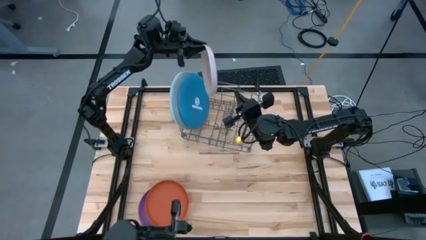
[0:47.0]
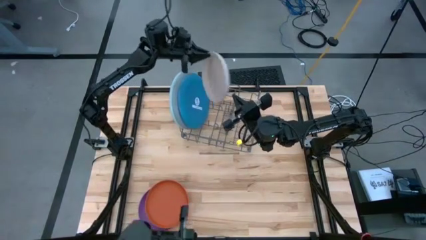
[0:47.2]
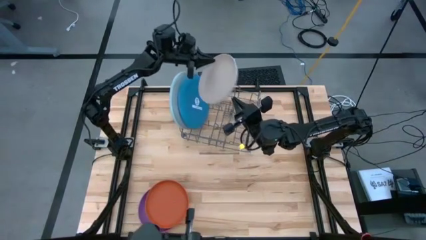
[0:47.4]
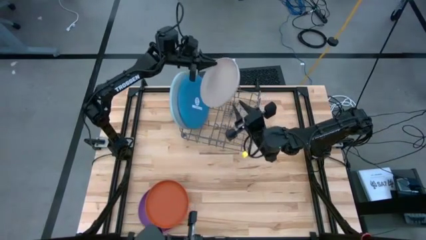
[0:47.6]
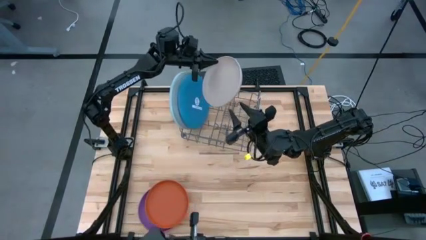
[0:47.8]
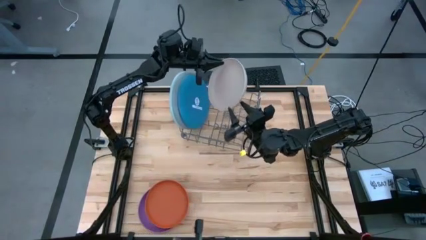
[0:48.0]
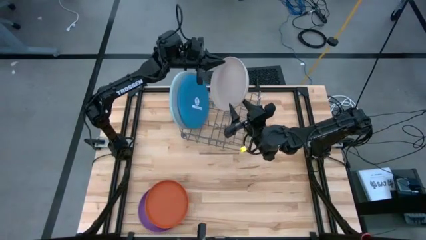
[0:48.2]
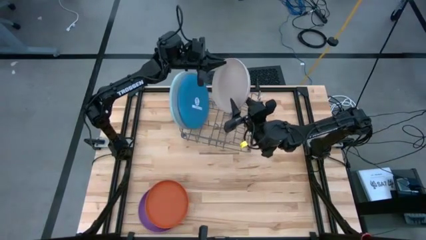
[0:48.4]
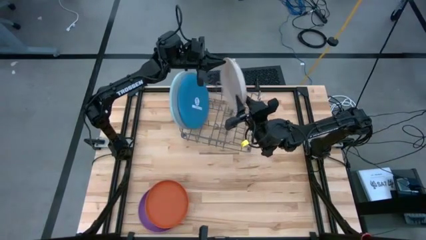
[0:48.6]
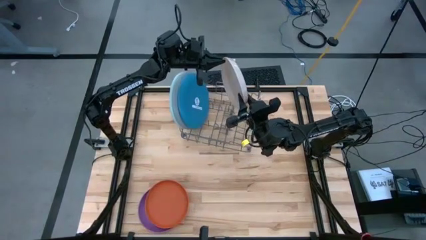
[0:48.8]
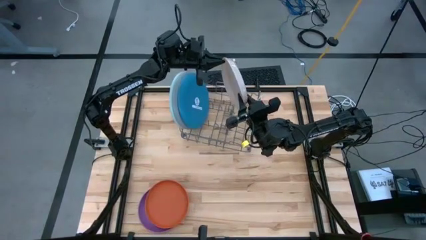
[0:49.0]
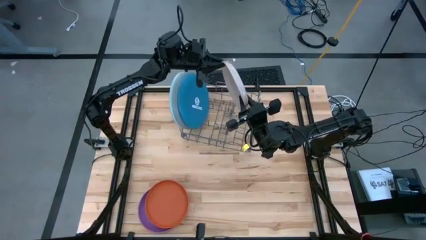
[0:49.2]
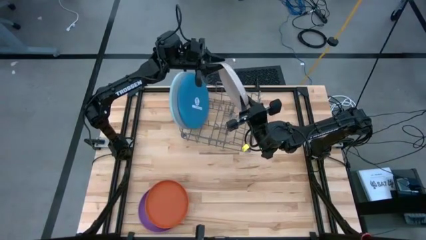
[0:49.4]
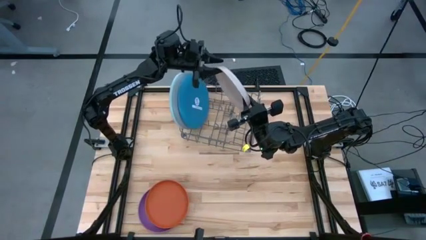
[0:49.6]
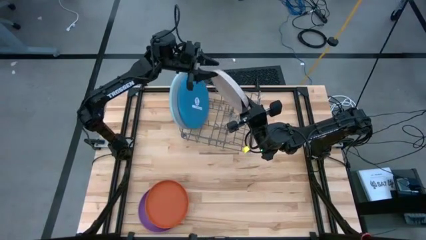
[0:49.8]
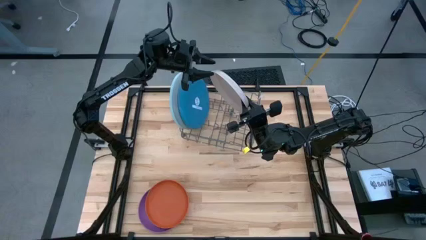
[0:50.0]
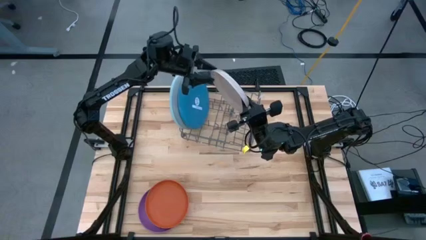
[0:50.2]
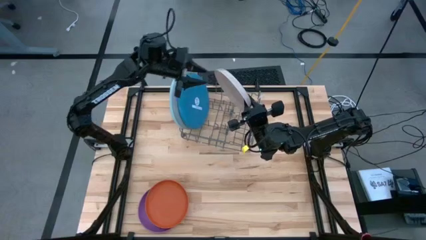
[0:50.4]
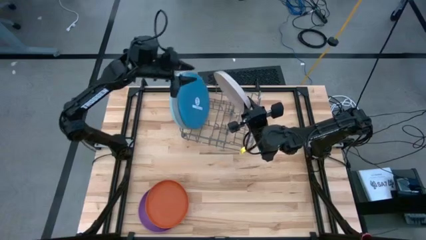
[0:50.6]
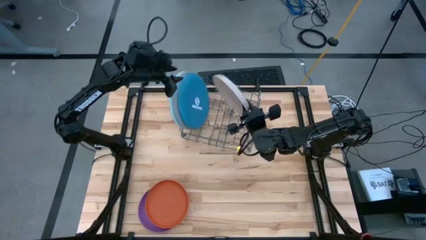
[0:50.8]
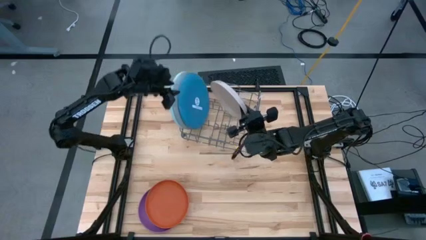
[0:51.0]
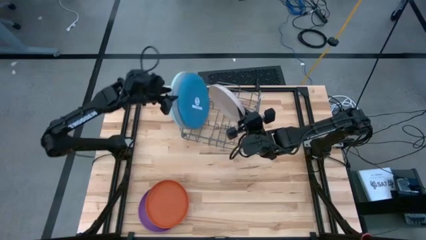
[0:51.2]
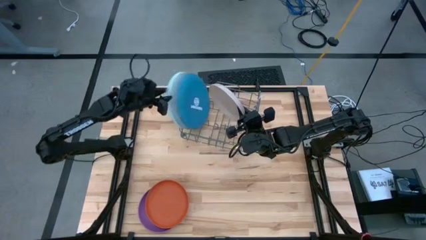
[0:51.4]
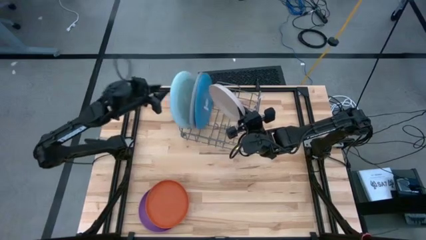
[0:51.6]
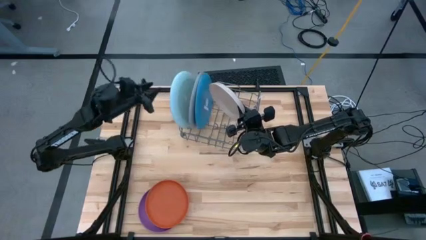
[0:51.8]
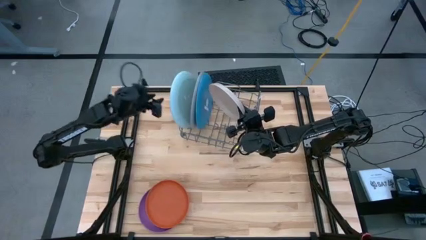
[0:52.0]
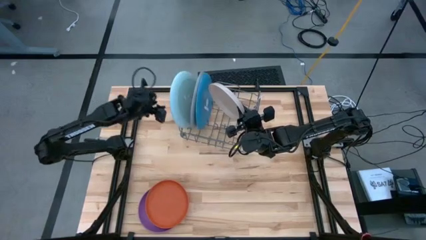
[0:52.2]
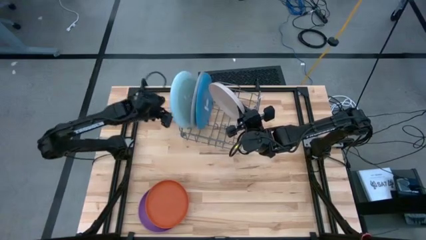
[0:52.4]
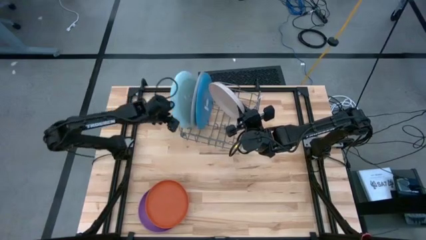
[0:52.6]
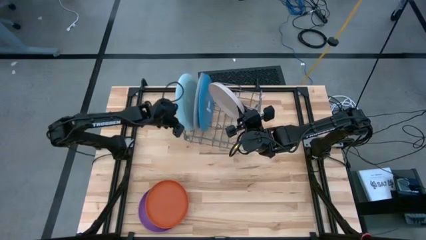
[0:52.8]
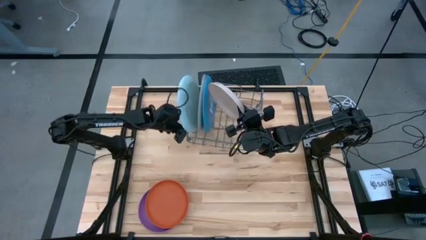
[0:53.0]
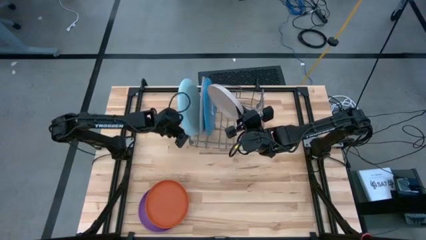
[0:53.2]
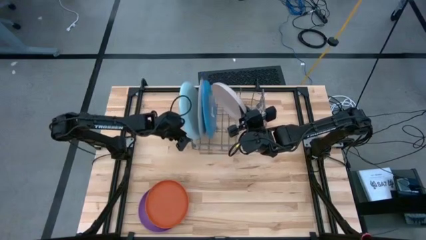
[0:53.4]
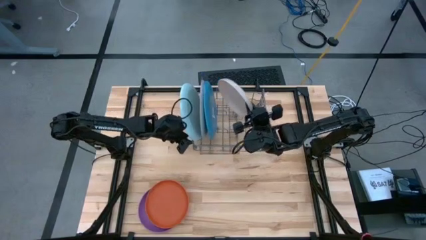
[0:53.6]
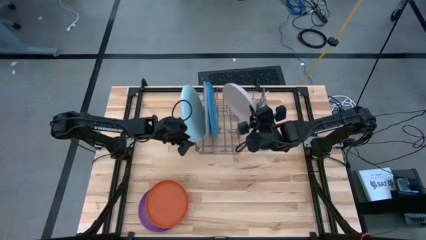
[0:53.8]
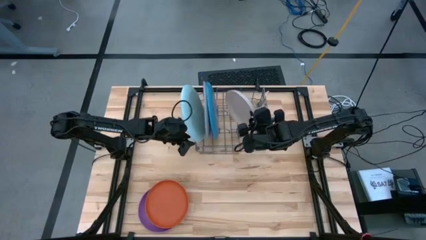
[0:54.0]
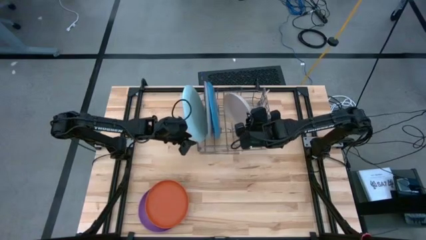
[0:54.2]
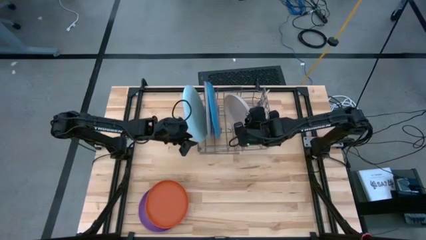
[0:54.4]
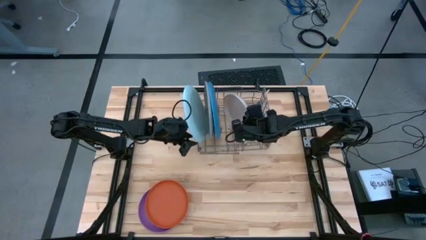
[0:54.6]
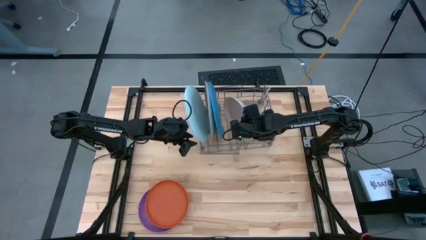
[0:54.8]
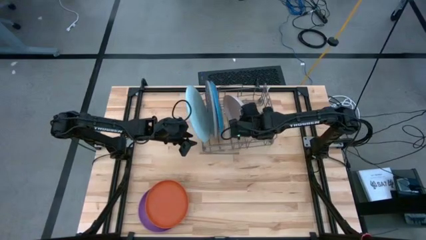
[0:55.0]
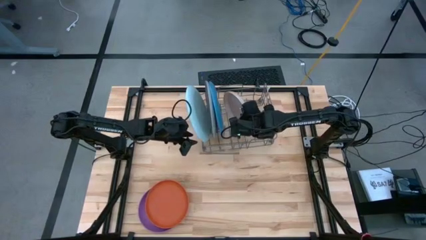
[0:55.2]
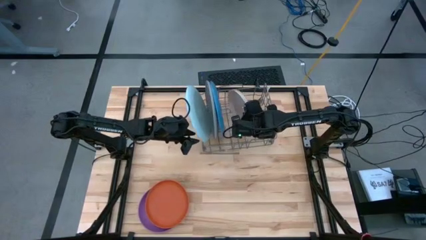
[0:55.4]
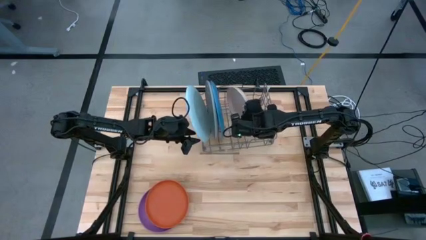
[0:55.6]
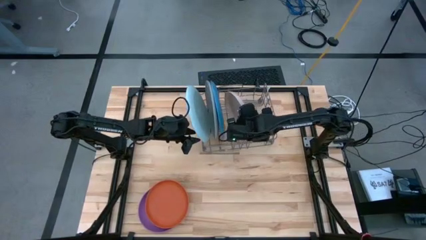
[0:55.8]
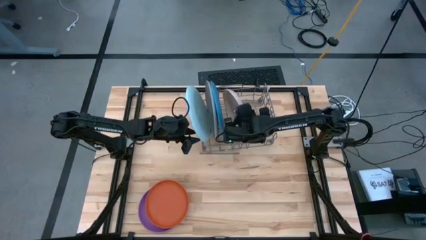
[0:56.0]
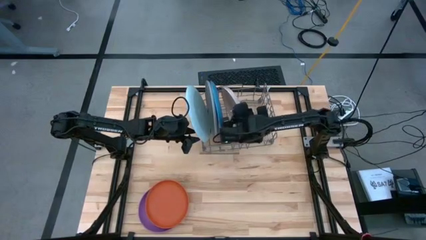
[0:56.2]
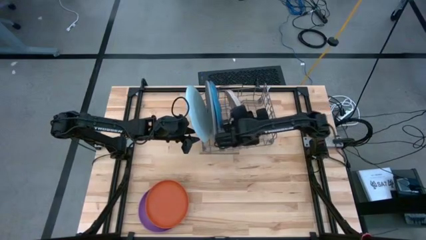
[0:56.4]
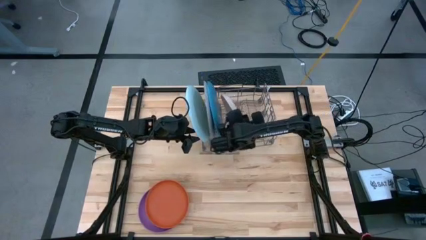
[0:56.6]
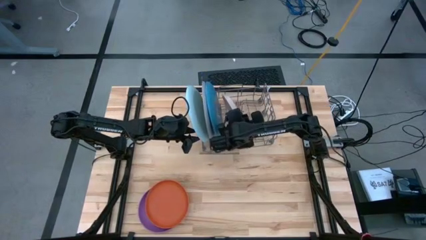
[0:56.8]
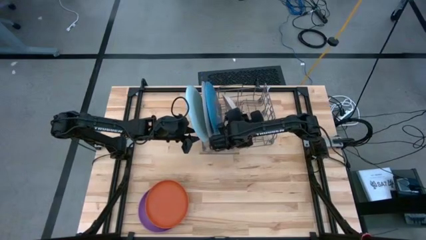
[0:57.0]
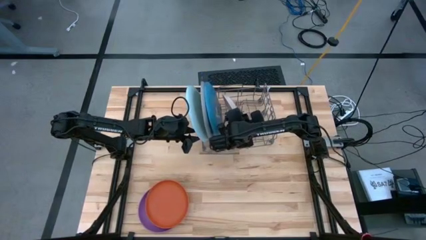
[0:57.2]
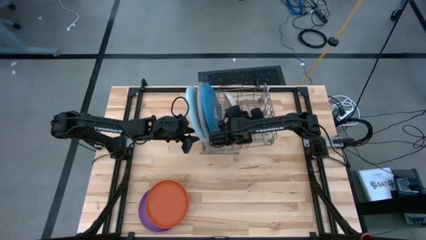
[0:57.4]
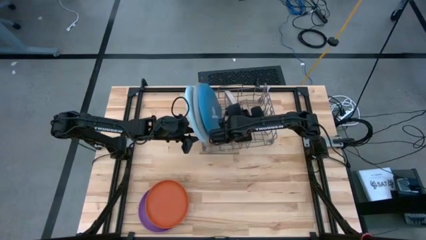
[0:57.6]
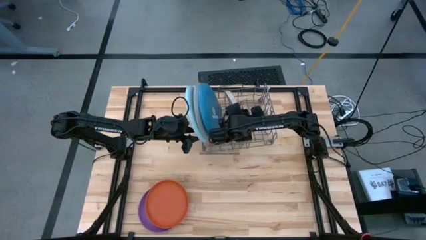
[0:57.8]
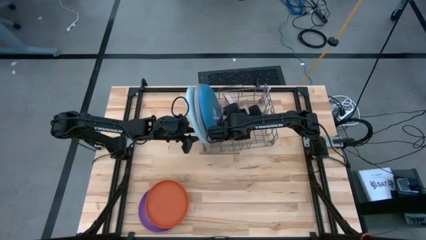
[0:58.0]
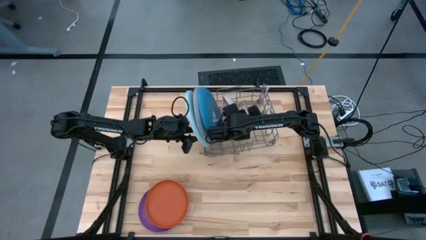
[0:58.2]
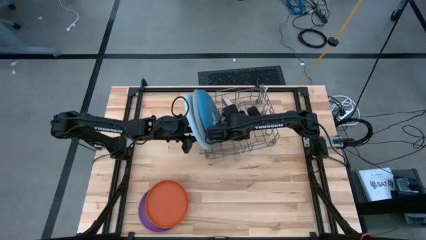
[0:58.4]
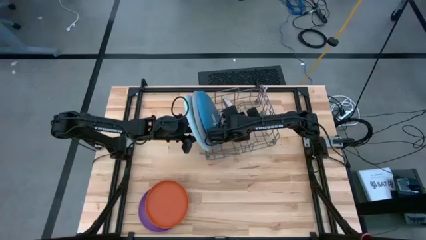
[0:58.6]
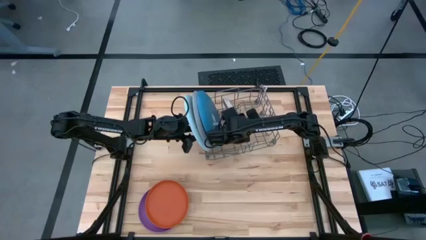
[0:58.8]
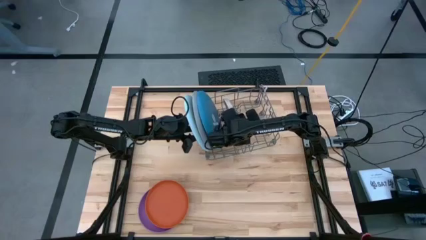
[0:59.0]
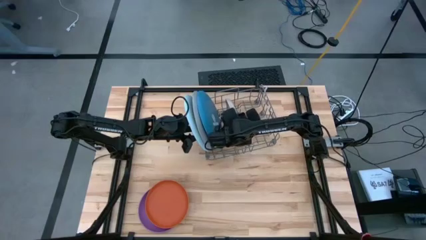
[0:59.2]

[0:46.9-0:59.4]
Task: Sort dishes
Put the white plate into the dish rack

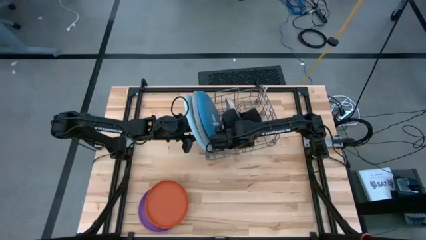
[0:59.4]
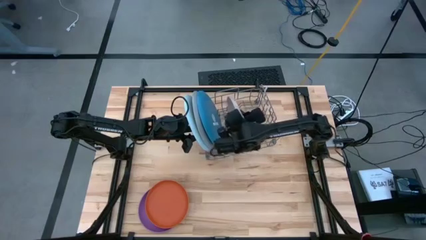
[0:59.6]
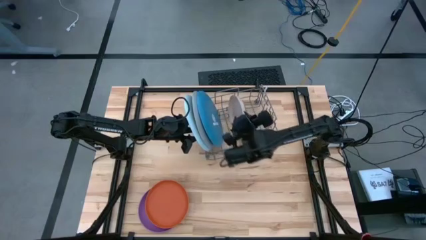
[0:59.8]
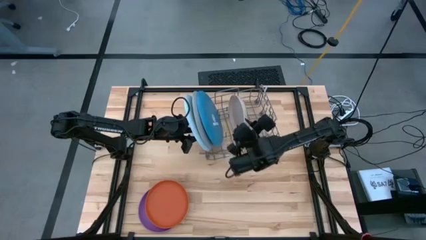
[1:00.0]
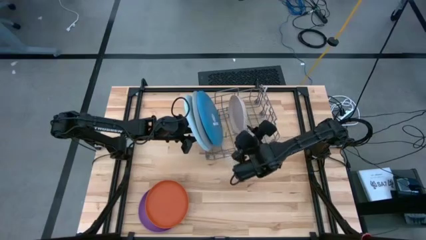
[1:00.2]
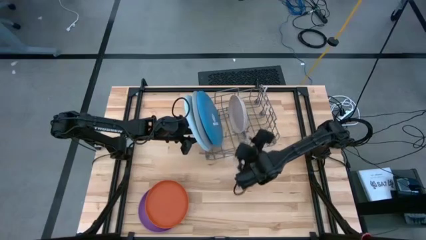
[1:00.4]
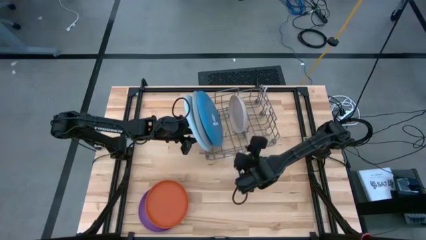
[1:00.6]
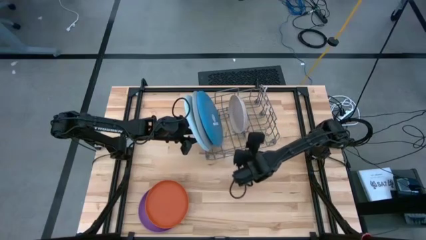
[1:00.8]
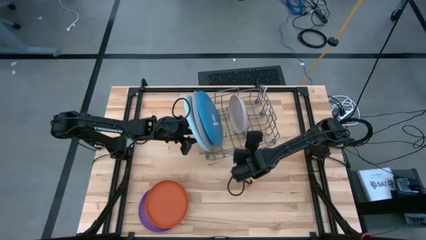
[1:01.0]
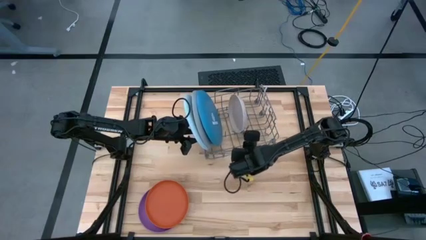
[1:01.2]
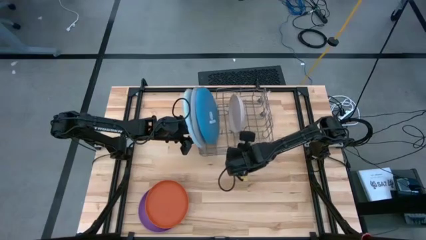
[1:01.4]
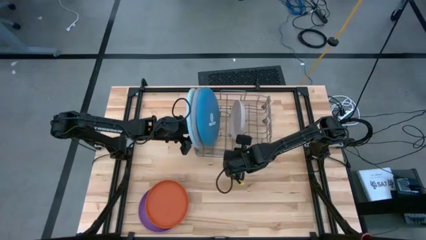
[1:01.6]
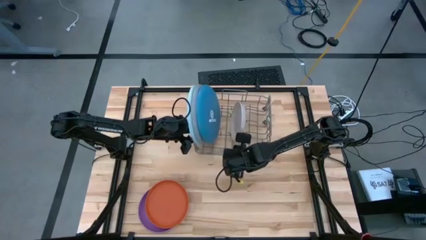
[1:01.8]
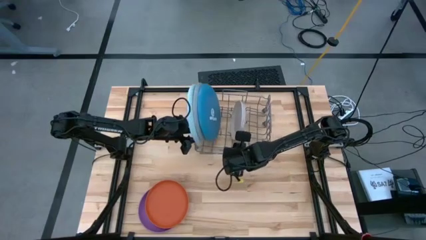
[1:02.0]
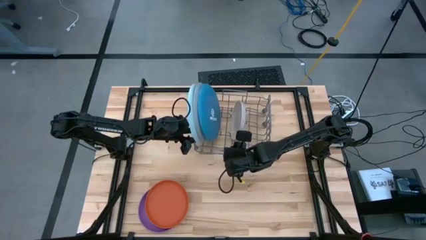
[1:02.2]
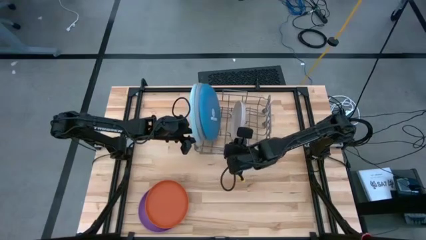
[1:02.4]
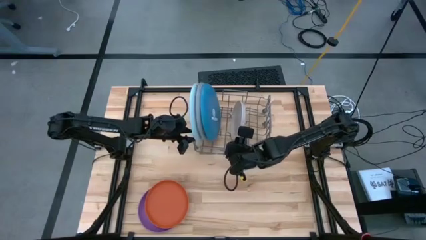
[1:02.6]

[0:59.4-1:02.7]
Adjust the dish rack
